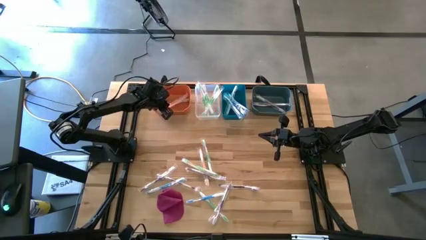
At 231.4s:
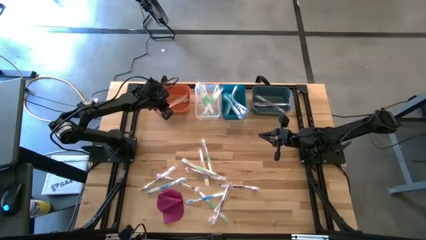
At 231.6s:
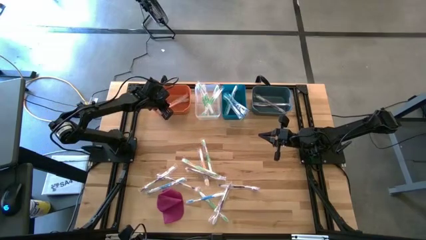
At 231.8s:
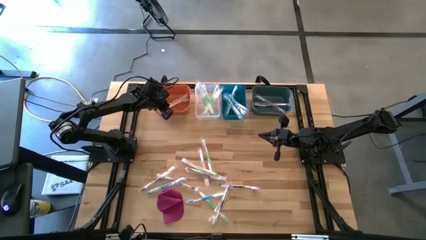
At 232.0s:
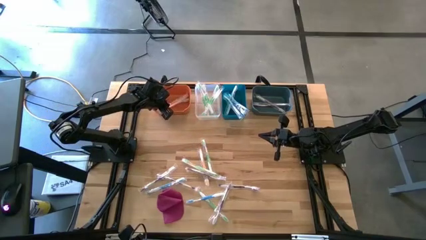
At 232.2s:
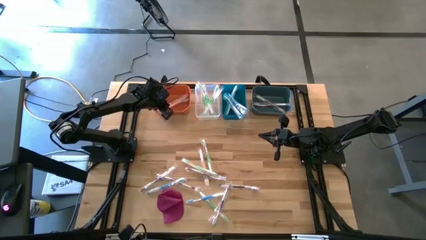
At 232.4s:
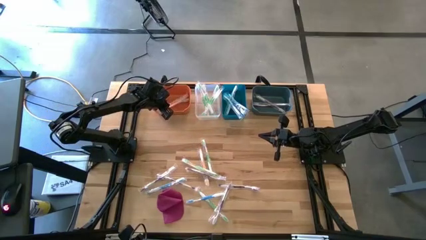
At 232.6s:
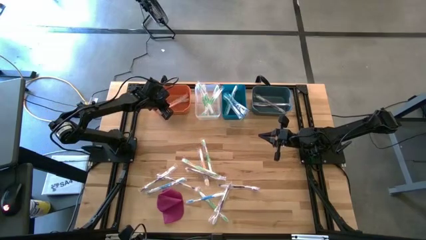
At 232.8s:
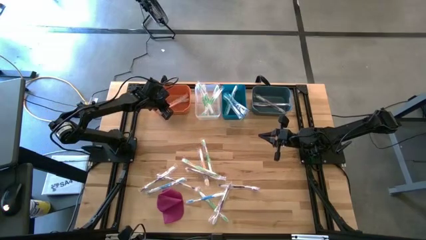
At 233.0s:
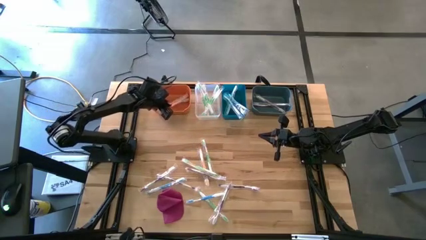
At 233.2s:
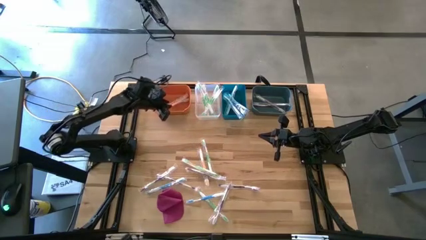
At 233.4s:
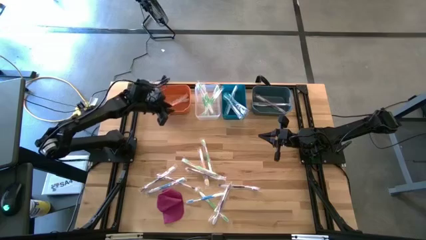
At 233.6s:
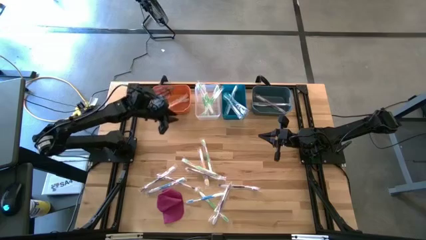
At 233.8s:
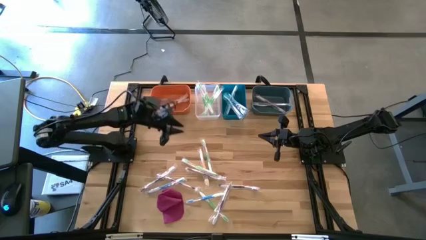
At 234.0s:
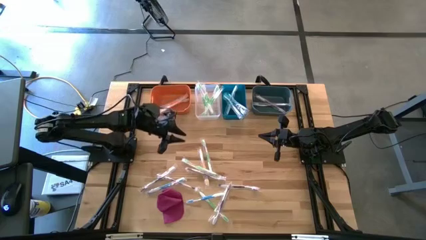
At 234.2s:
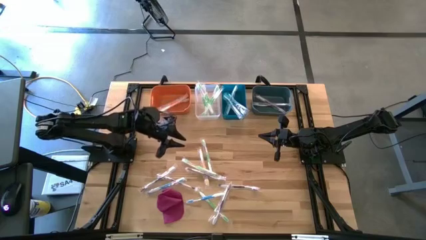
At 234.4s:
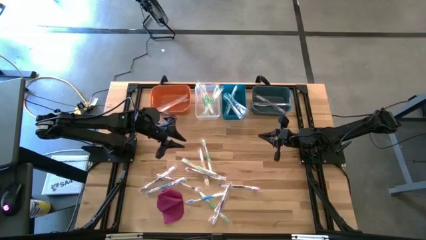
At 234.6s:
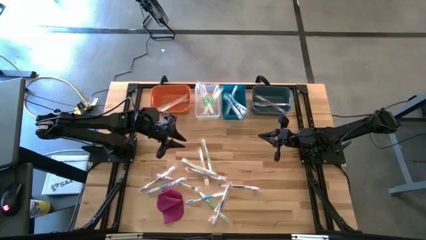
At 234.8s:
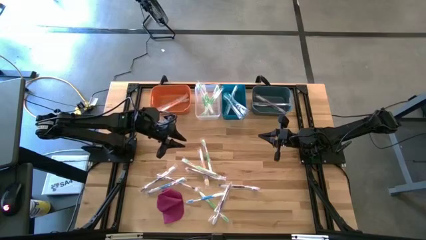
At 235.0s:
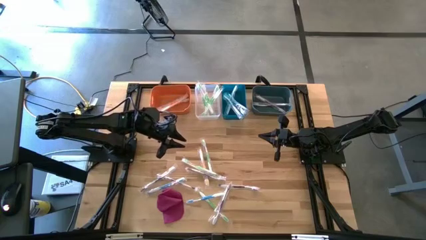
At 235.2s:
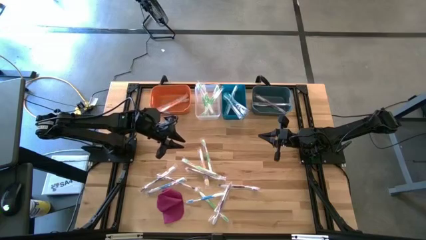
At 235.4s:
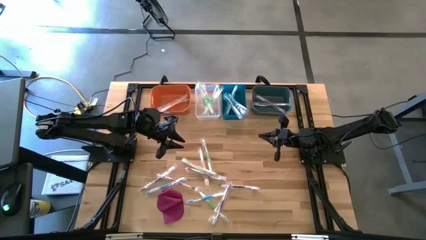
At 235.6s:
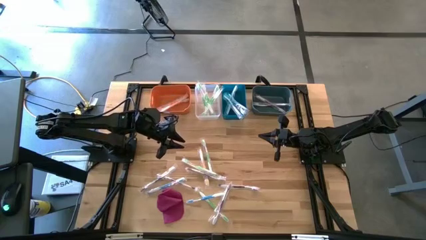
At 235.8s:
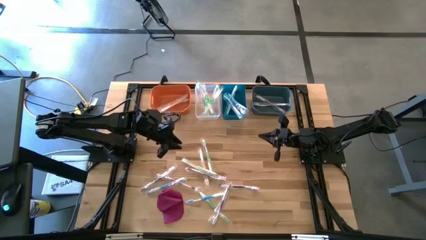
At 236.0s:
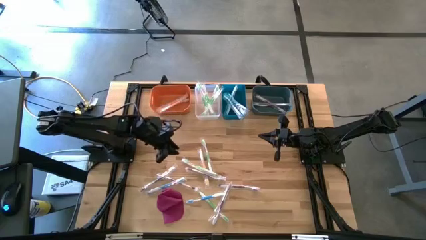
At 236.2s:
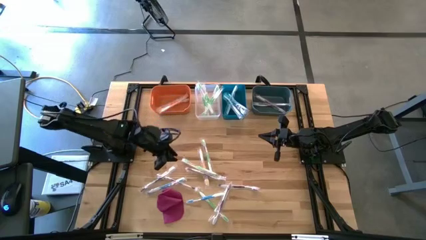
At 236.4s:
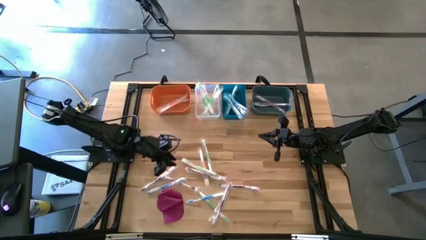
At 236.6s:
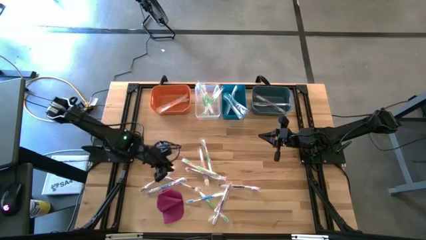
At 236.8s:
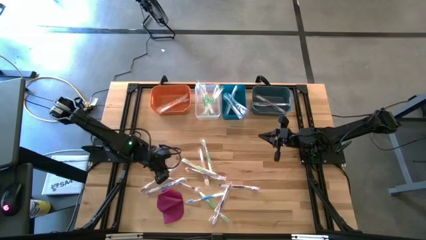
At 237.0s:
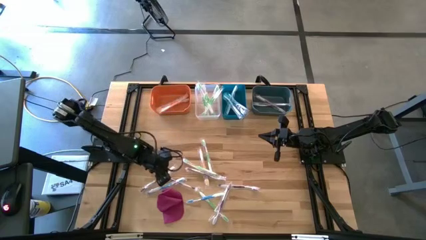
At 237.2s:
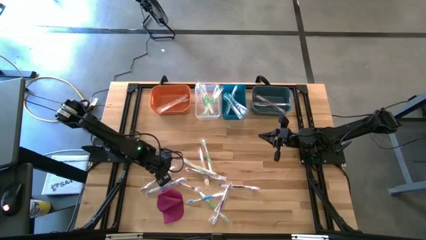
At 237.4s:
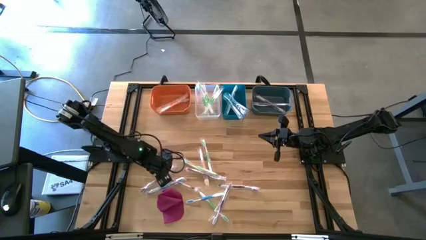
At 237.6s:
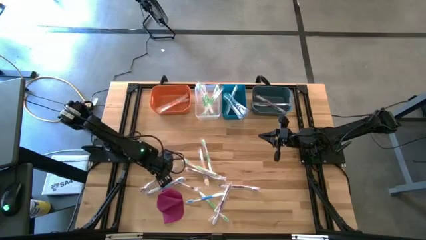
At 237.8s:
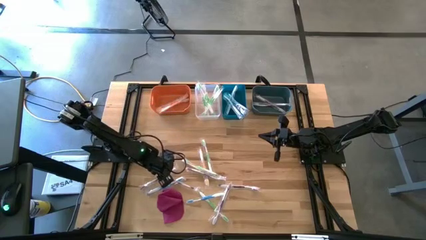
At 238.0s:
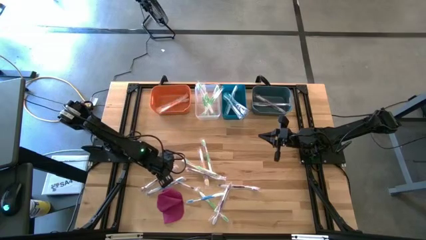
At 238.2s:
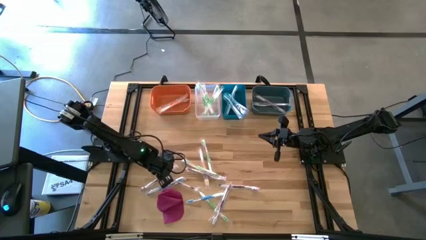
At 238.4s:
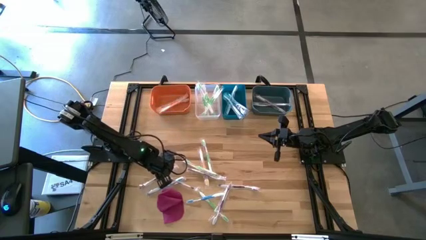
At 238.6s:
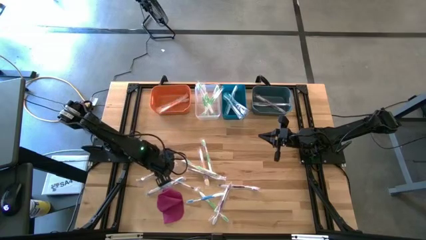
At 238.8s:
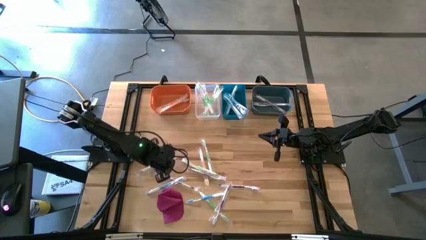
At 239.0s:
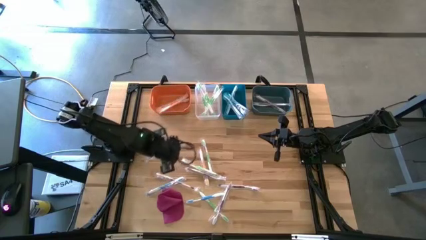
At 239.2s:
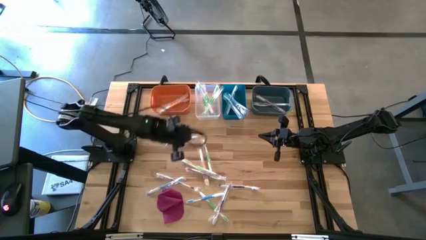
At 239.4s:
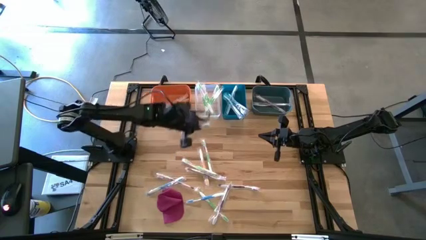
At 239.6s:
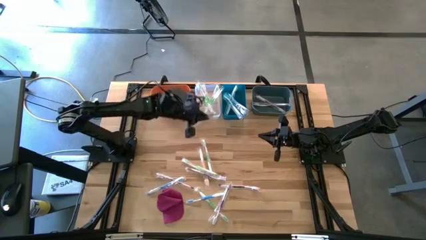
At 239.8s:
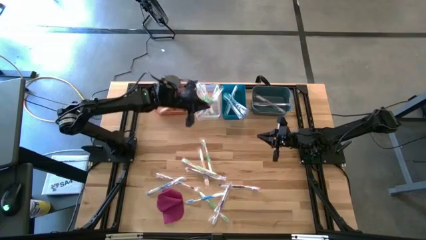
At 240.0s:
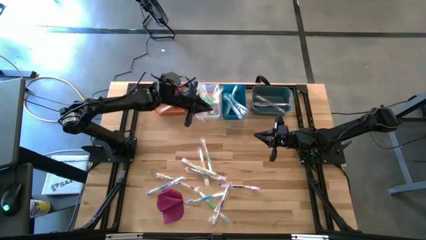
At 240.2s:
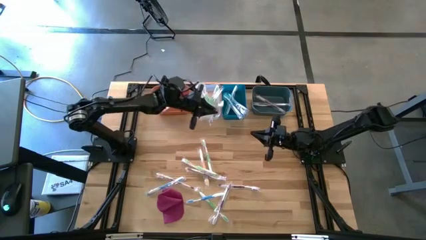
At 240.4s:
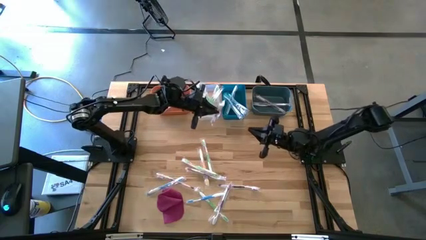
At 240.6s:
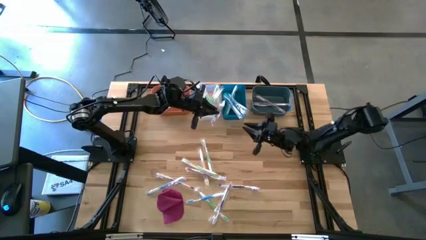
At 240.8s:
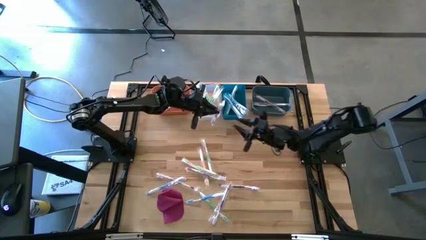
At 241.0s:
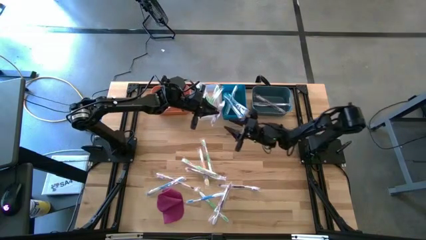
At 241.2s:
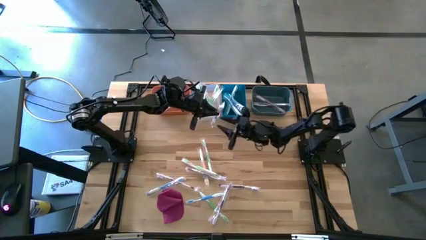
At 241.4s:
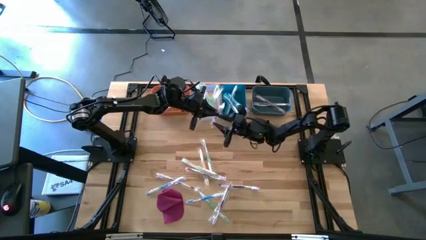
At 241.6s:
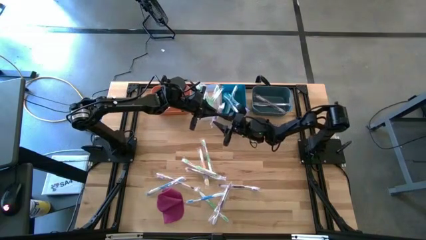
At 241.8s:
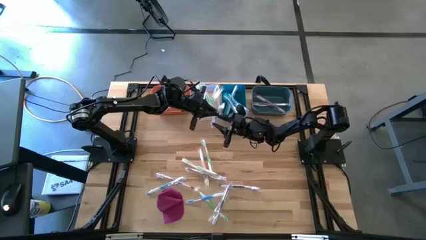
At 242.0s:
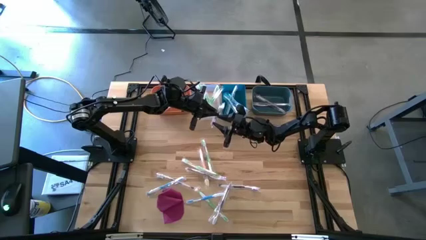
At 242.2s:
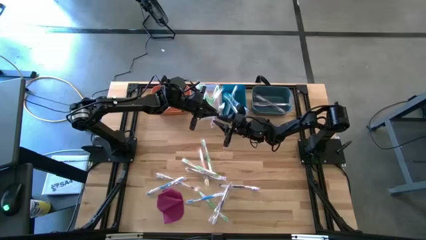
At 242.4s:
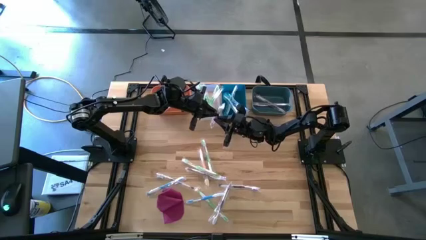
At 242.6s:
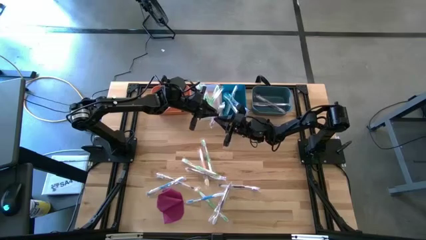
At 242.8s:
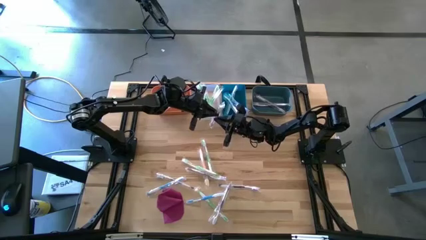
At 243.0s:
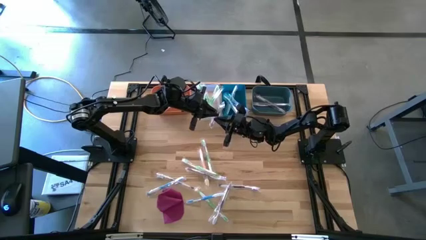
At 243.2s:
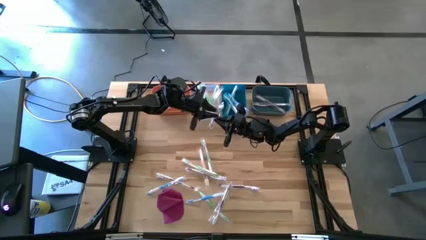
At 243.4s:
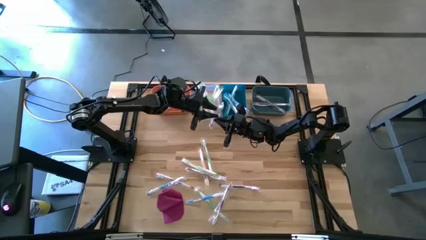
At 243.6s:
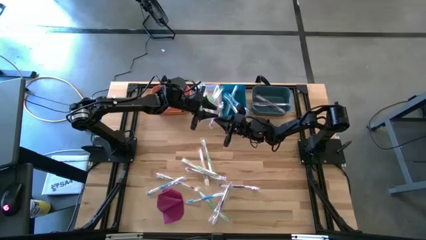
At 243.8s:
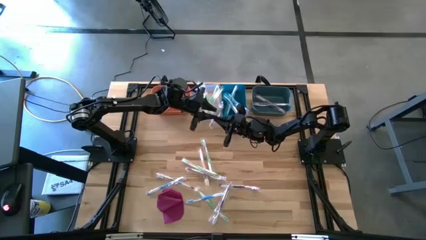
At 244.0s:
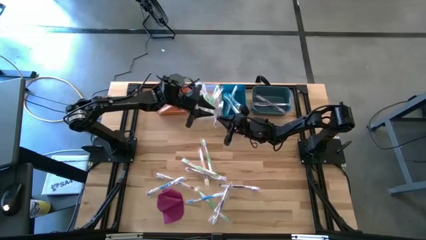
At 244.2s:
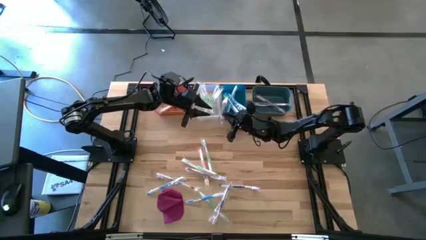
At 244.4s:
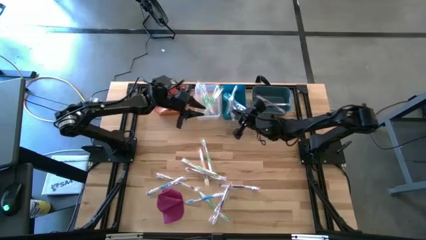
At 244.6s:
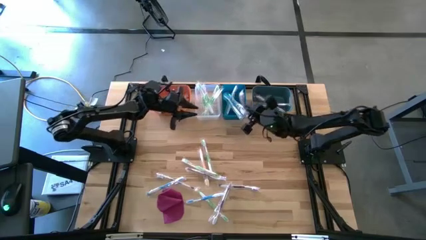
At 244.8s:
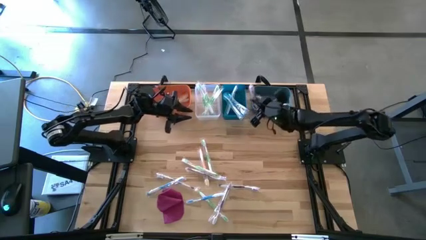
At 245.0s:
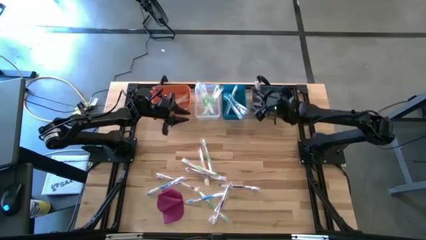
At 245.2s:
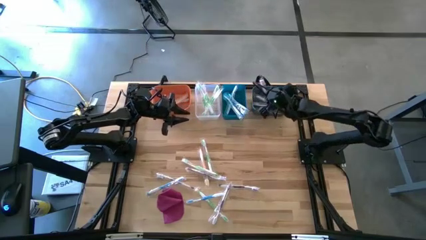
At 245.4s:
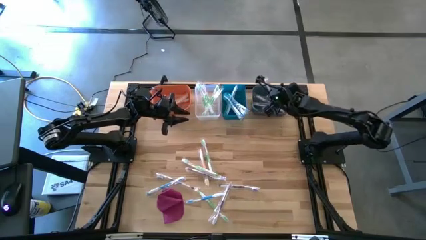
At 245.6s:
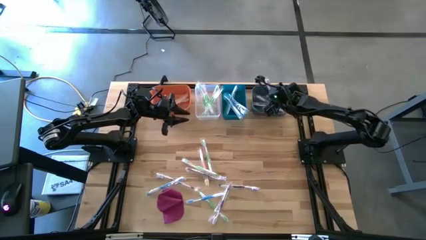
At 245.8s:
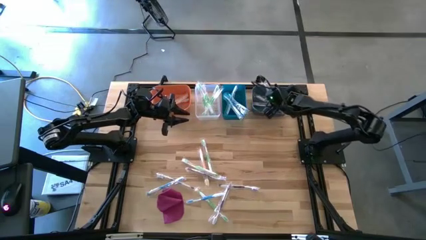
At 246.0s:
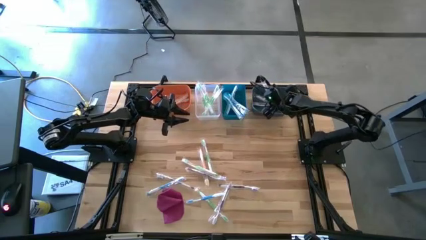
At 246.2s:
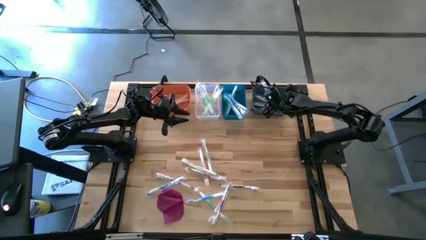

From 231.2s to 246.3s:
Task: Pick & Place Toothbrushes
Put the purple toothbrush into the green bin
